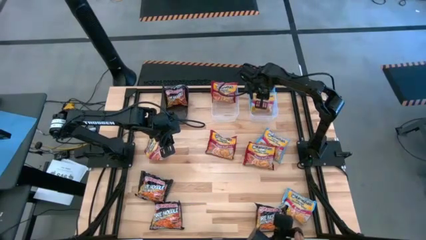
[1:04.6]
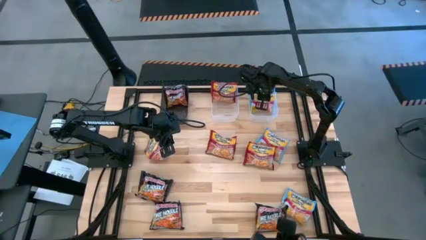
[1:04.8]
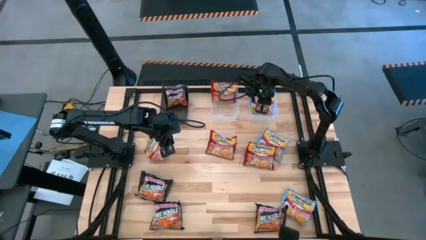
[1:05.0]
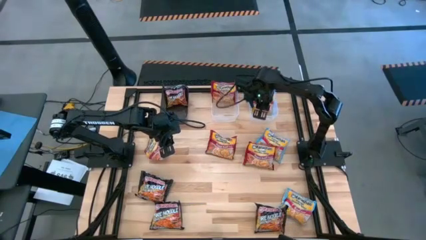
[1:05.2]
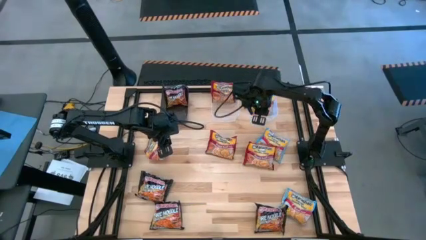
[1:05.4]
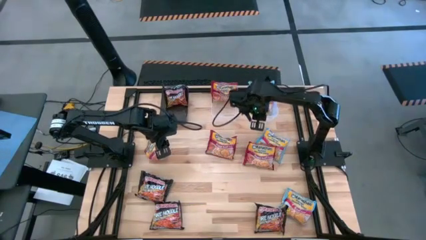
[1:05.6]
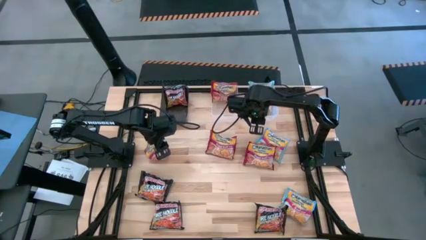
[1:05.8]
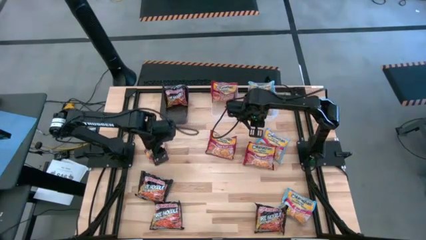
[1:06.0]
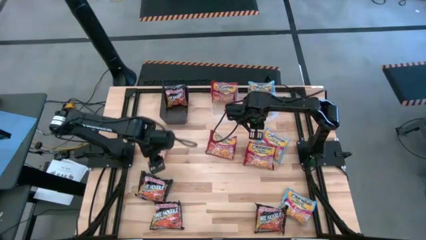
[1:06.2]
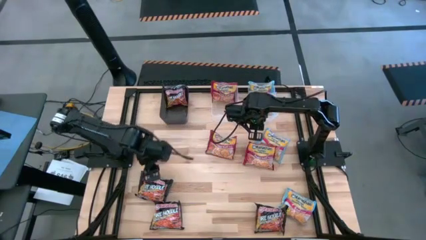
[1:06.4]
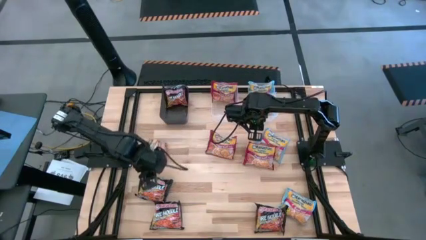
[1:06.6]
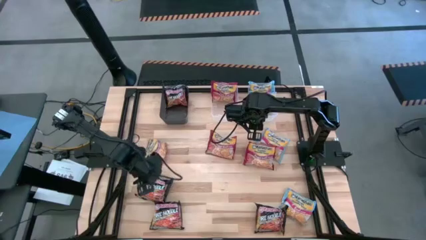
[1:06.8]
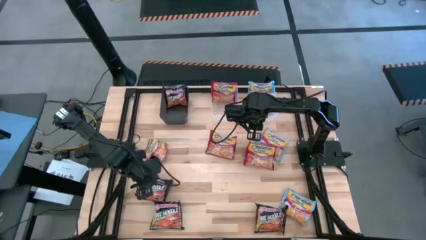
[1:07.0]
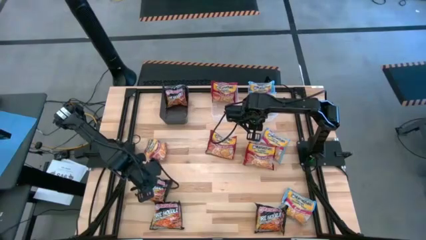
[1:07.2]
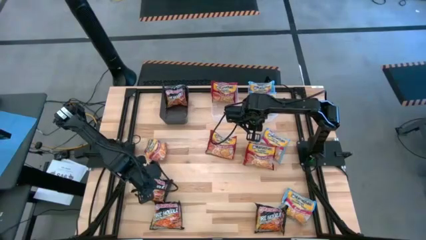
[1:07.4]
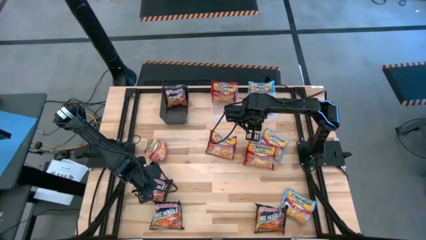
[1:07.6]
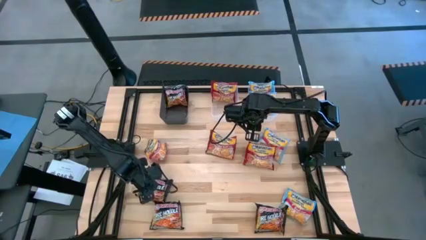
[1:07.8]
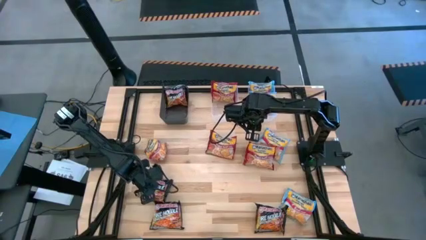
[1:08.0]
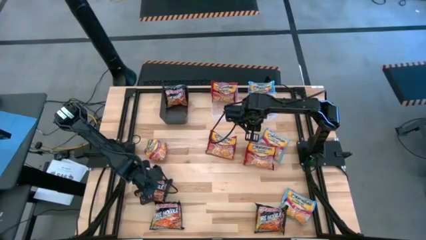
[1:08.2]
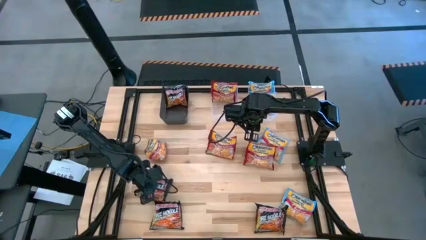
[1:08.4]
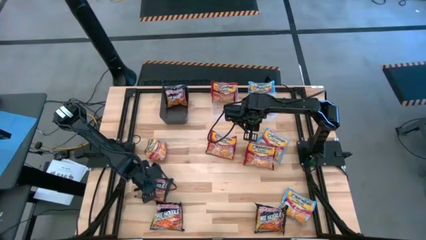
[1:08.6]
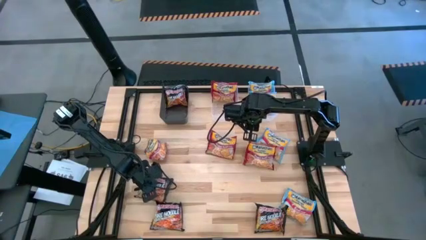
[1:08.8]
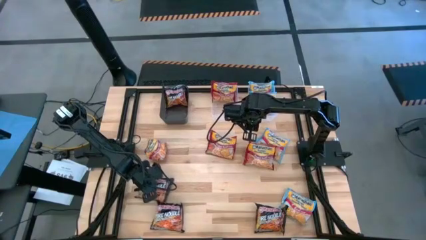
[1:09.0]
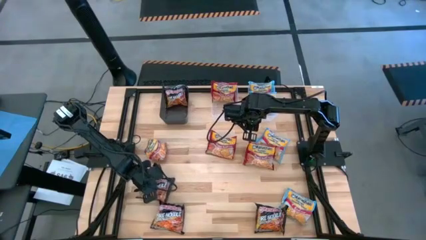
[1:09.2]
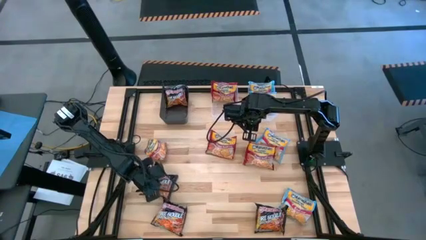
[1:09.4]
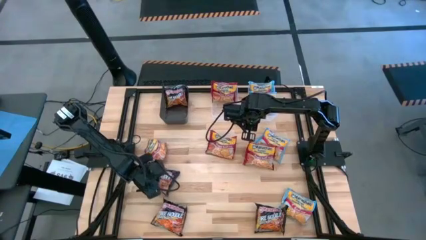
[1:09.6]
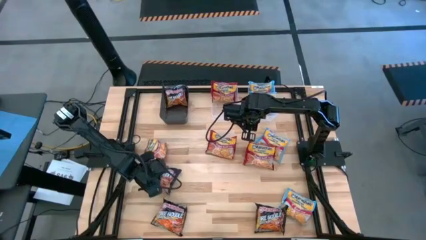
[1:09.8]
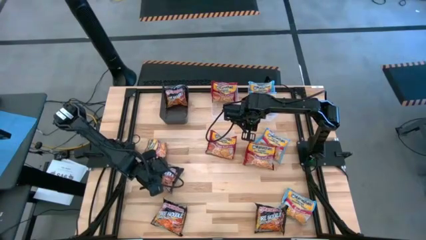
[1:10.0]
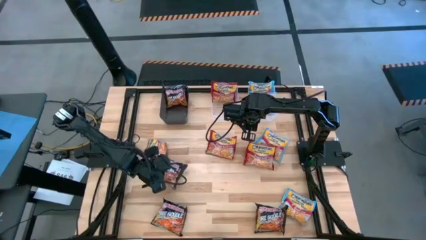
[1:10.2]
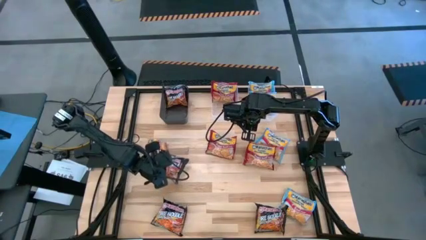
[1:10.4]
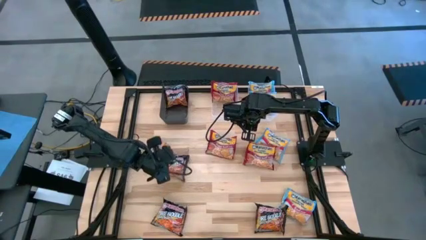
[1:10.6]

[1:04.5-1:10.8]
Task: Sort Maruchan noodles
Put the black noodle pack into the black bin

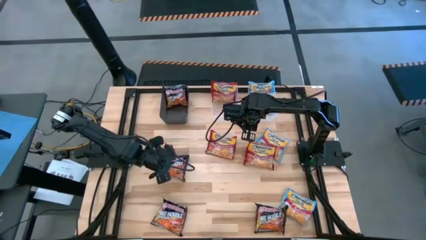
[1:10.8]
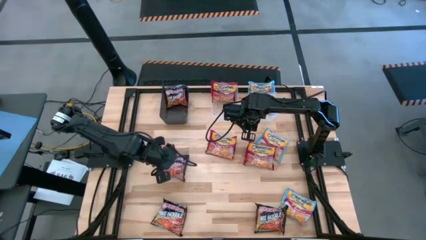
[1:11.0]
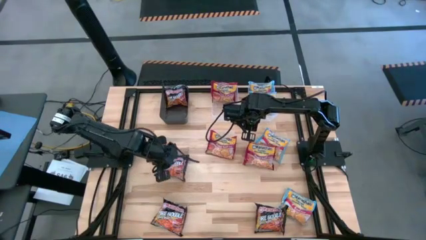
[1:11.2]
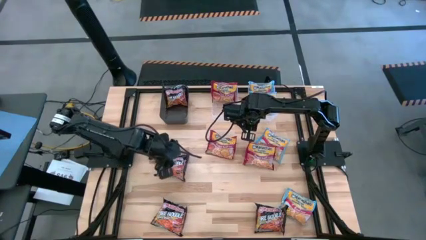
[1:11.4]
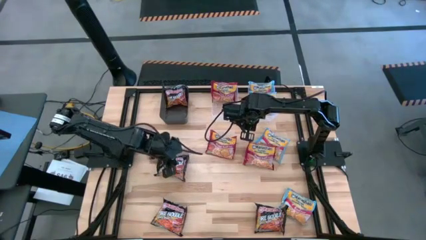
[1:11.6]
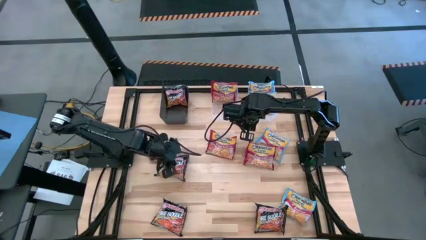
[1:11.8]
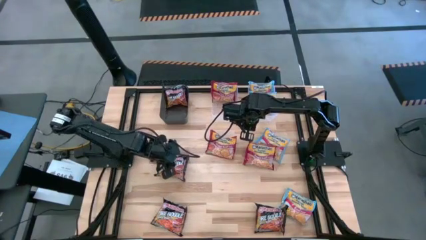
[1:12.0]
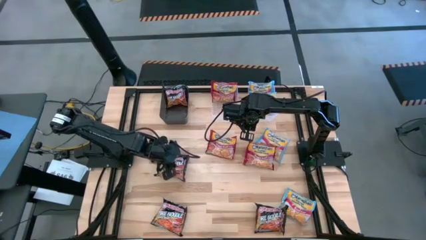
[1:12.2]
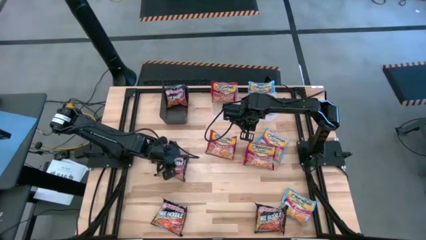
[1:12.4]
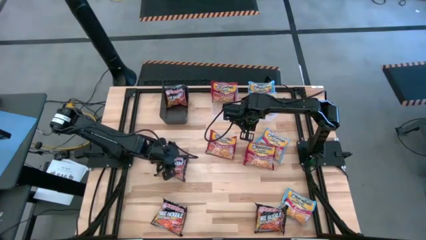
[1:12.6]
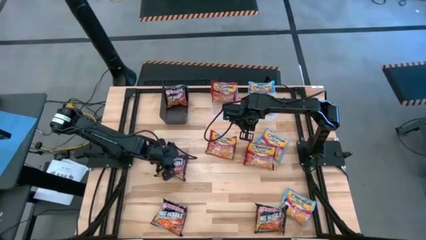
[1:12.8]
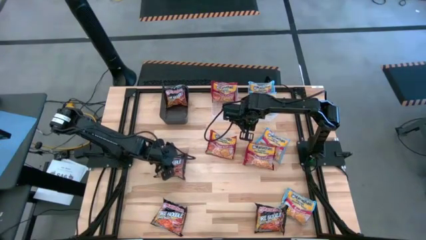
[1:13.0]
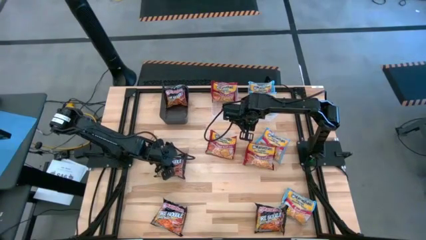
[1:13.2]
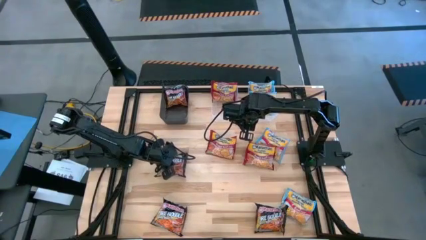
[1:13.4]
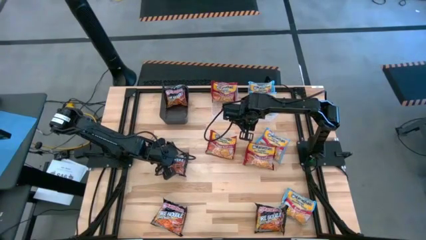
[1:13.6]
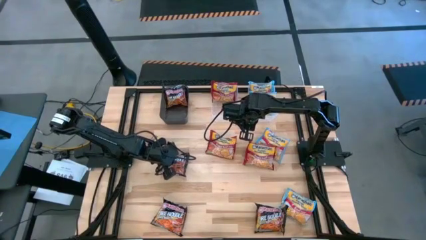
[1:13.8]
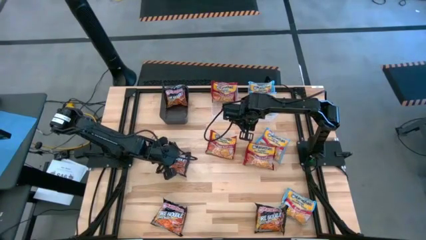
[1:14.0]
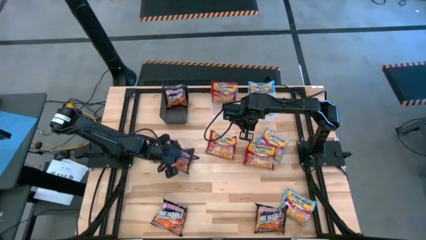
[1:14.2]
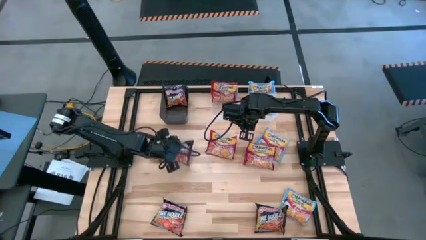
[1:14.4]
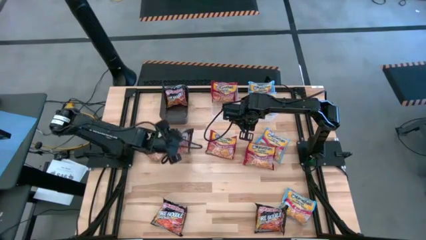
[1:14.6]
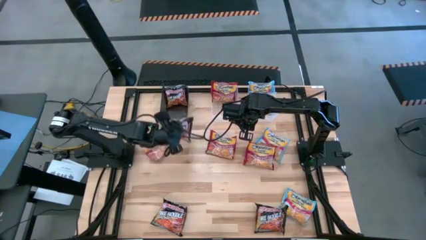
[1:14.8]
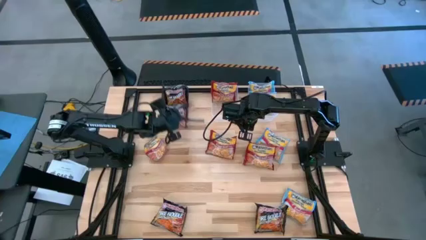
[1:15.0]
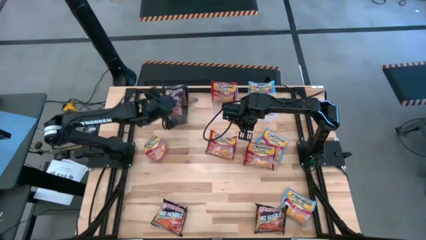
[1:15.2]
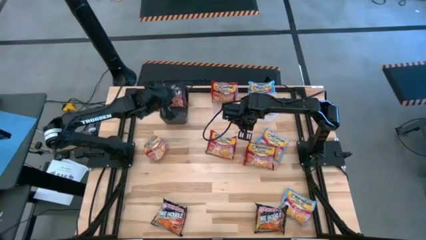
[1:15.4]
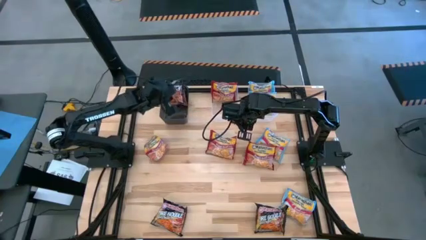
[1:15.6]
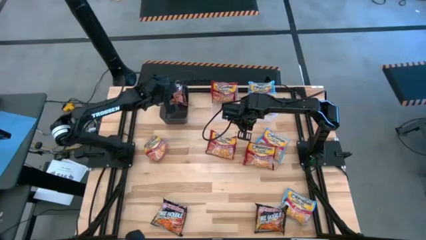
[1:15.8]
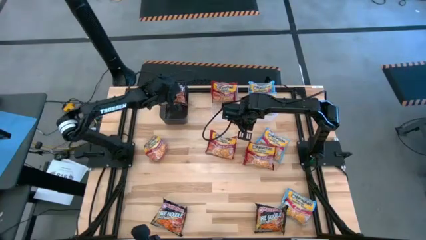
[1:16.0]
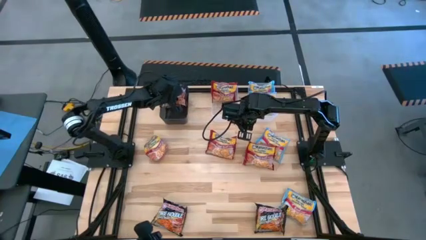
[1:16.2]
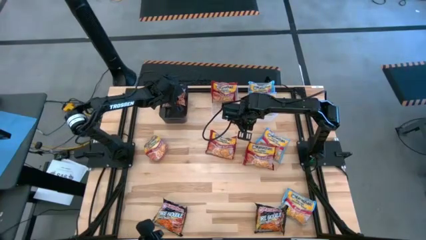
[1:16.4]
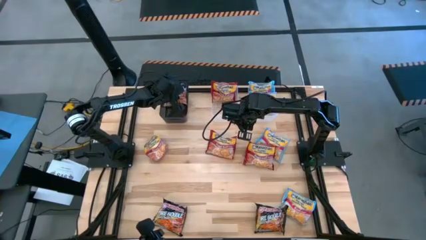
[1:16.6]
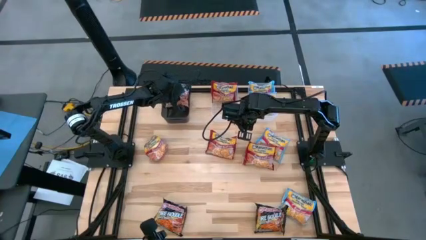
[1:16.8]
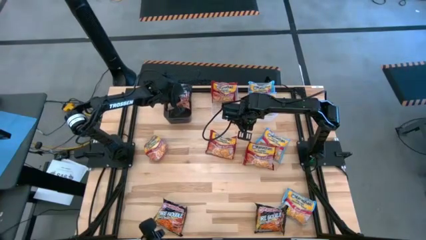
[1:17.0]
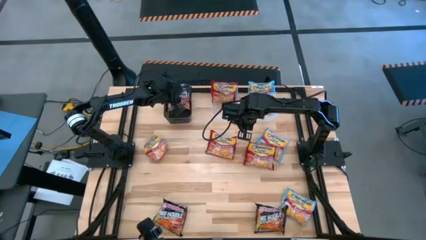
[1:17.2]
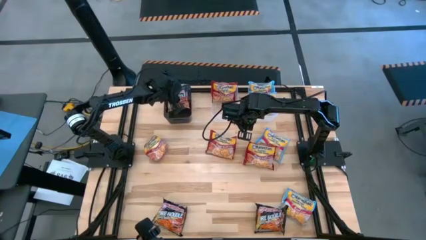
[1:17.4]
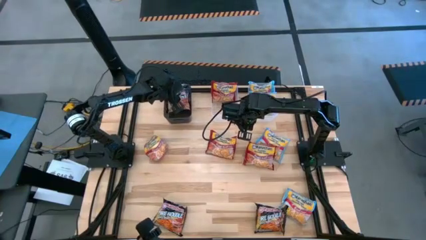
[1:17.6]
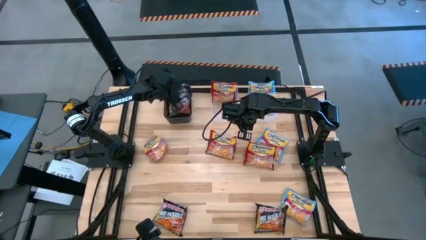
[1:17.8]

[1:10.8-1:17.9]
Put the black noodle pack into the black bin
